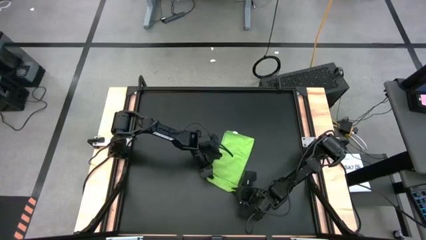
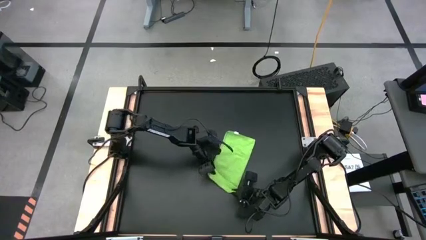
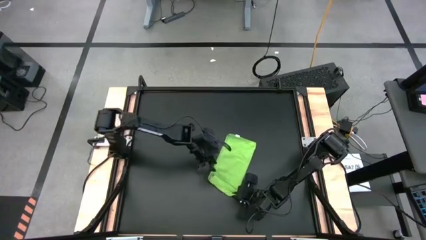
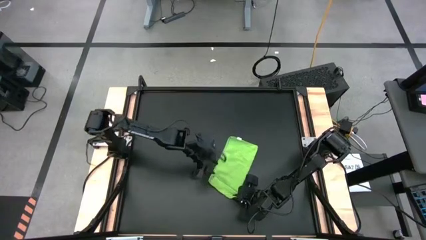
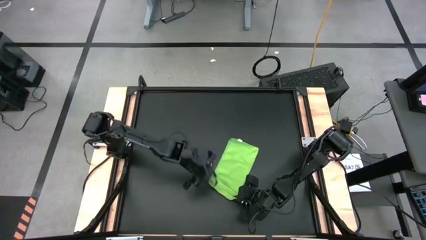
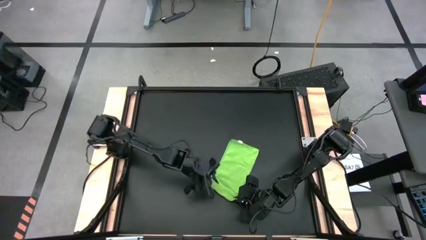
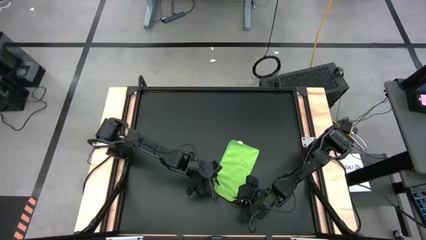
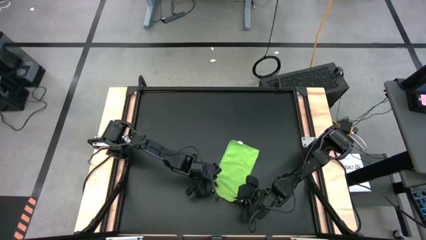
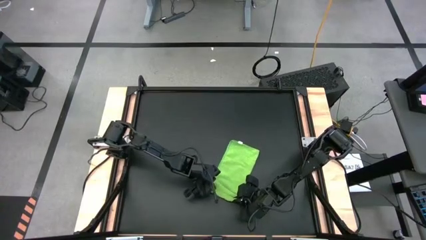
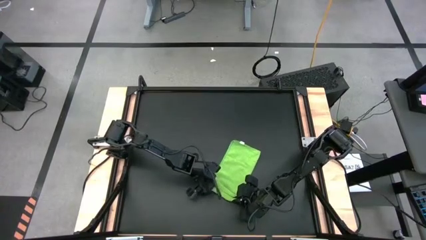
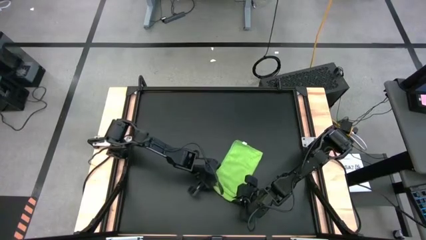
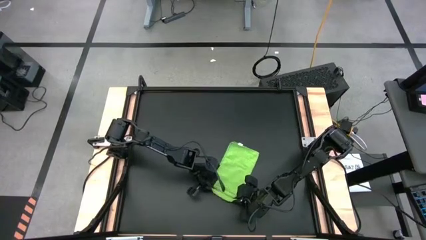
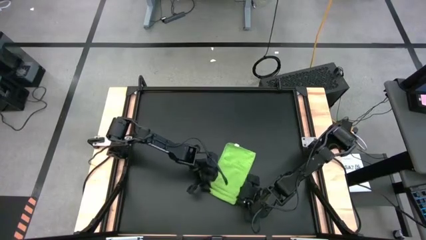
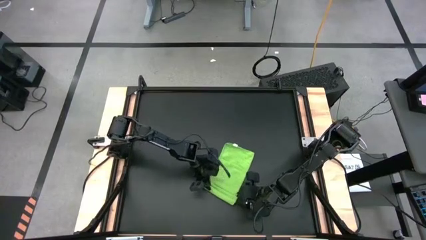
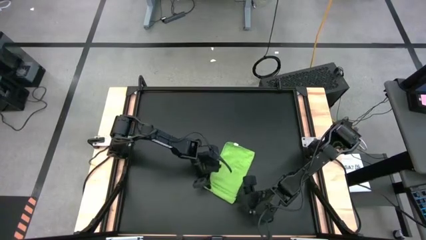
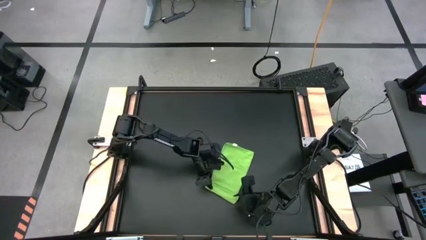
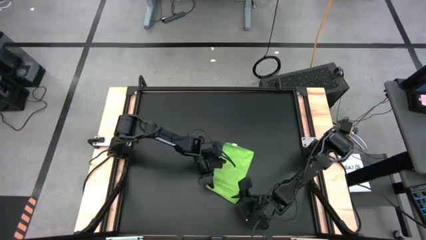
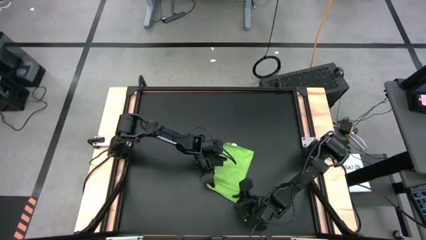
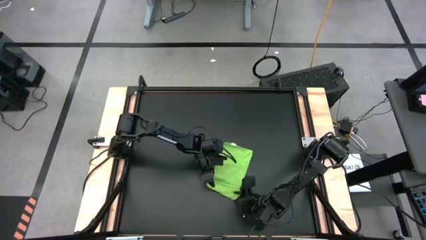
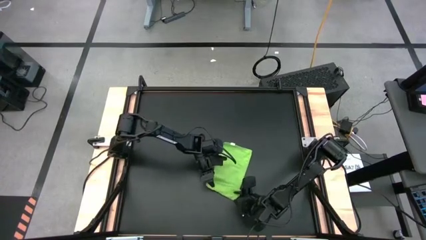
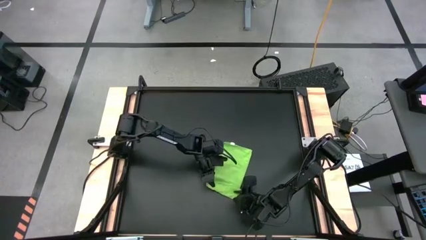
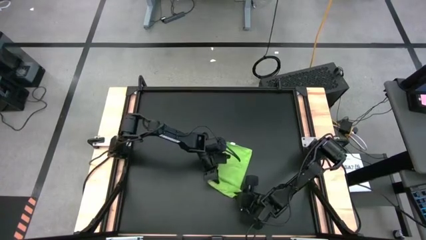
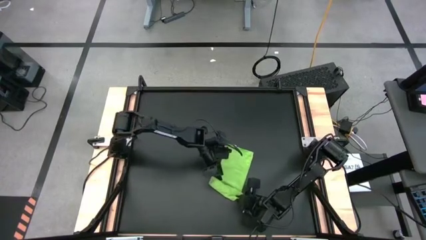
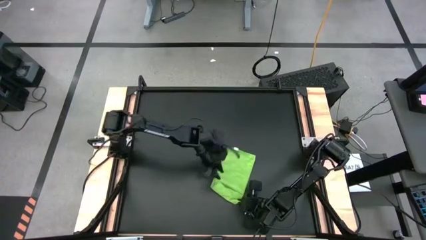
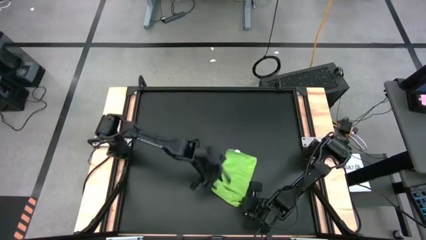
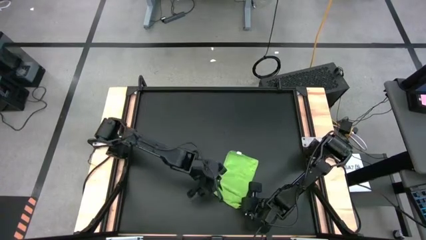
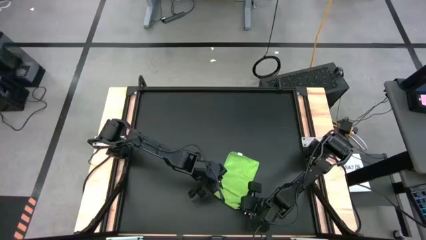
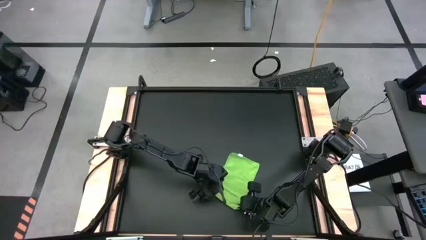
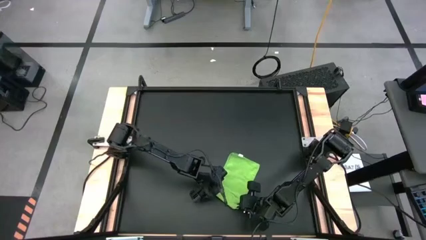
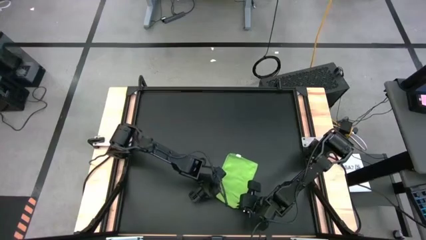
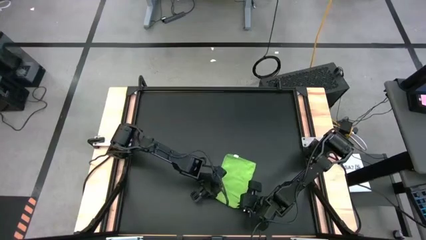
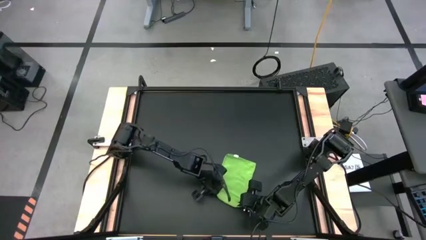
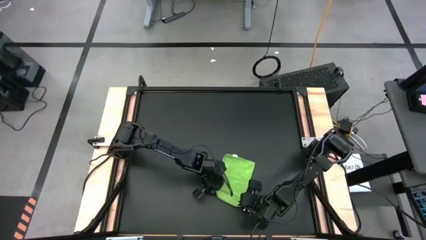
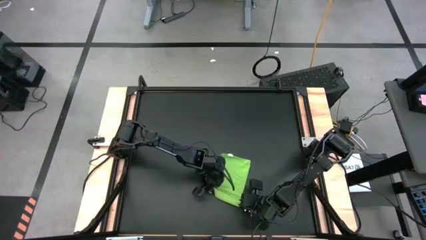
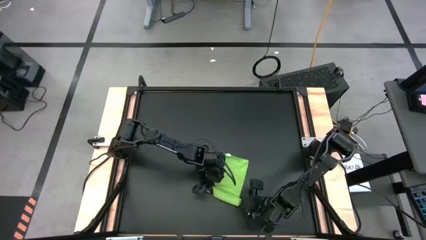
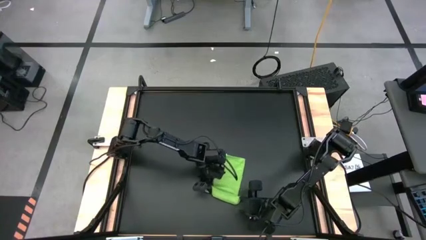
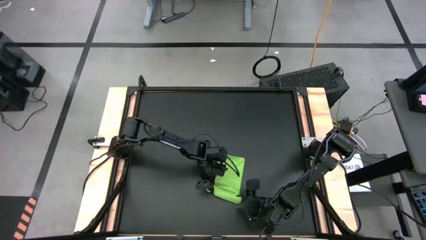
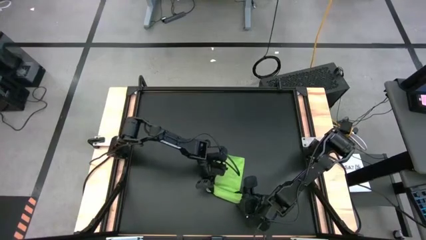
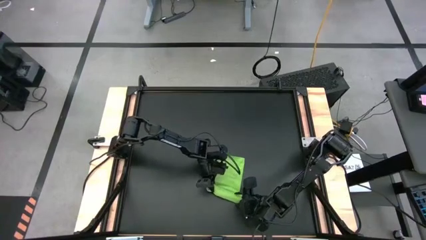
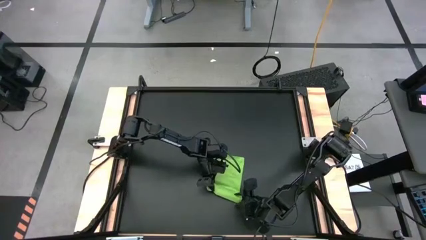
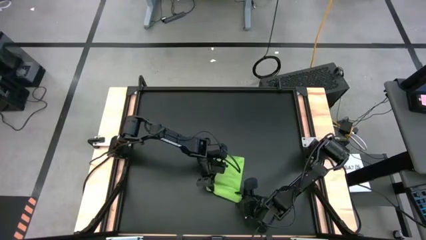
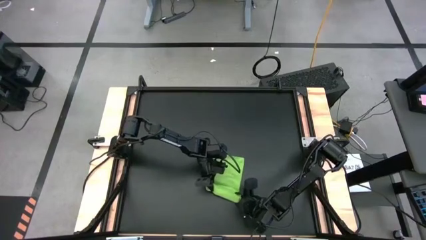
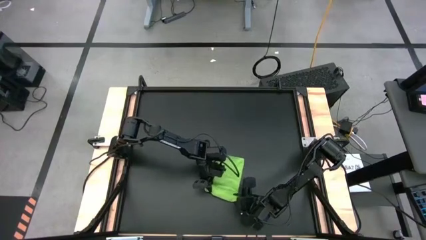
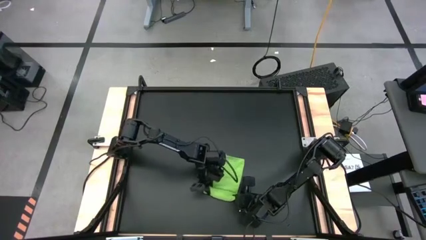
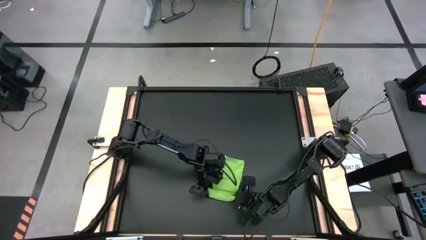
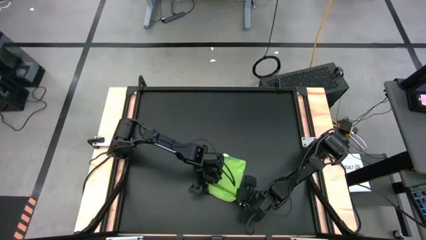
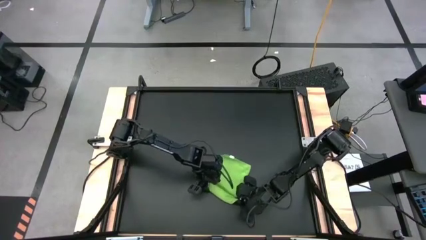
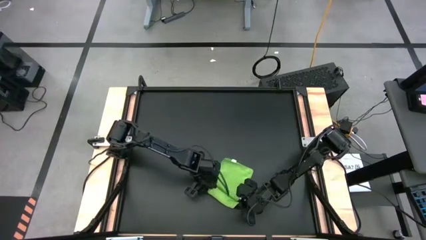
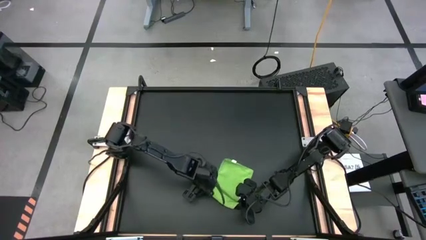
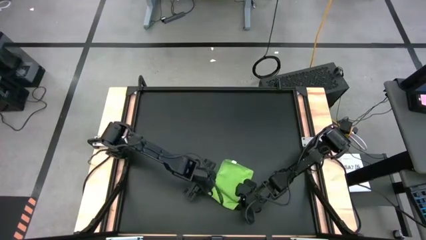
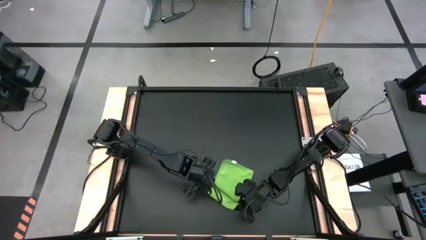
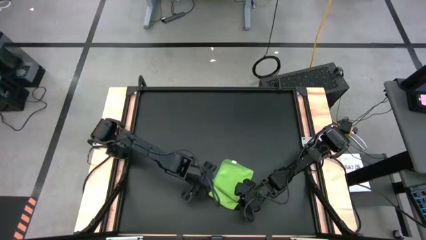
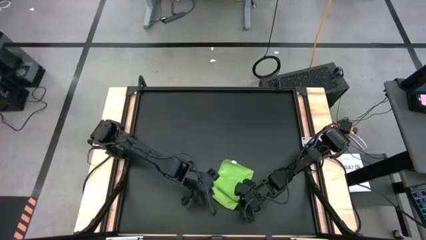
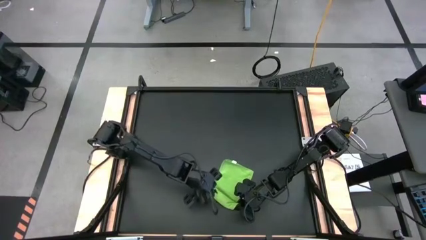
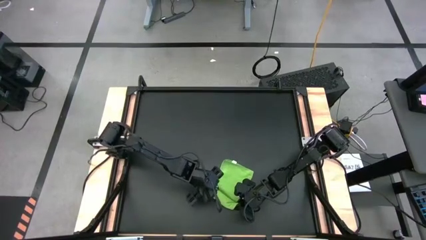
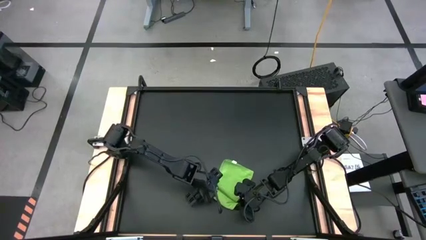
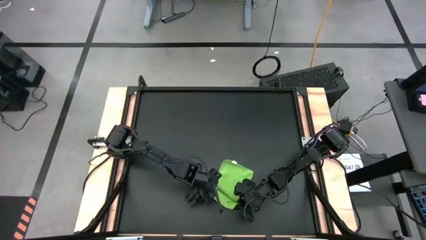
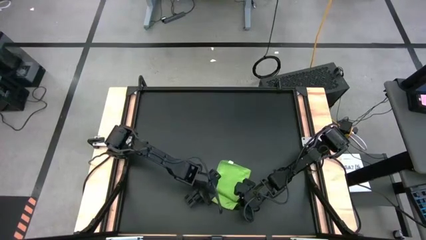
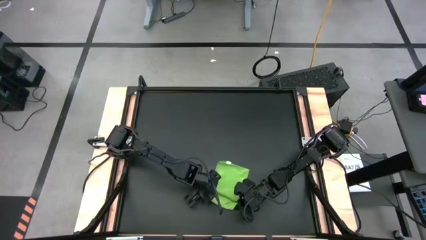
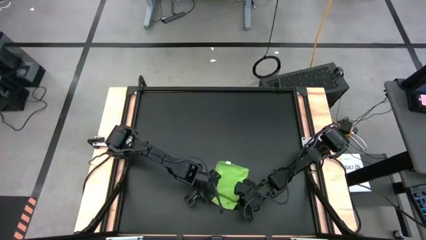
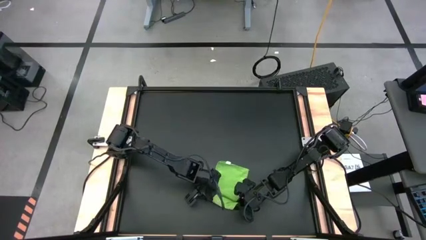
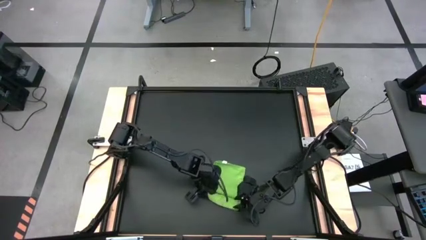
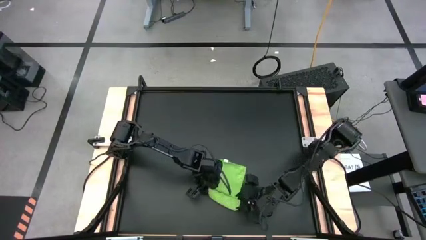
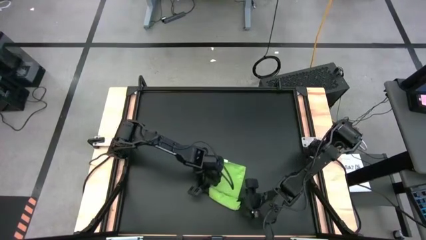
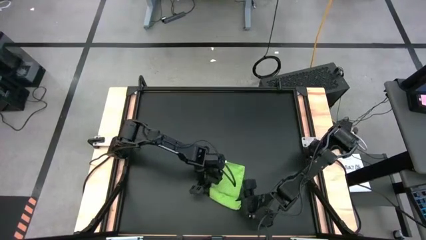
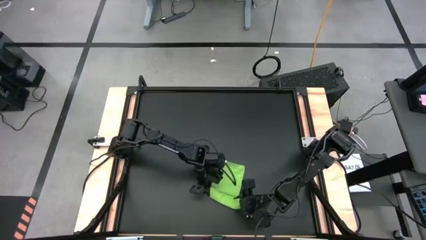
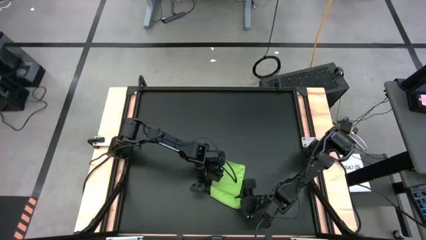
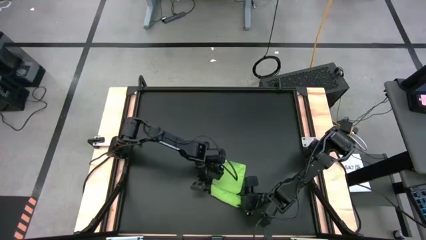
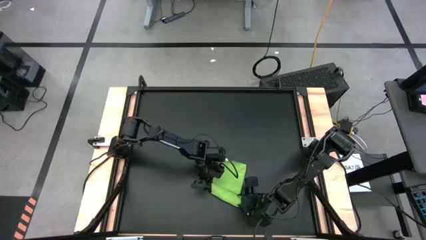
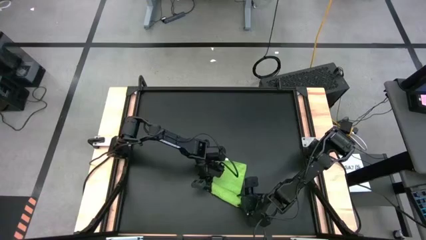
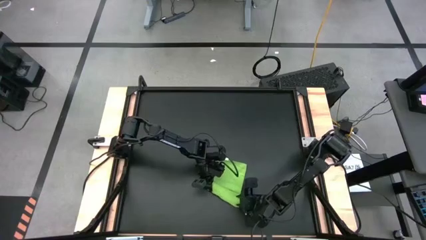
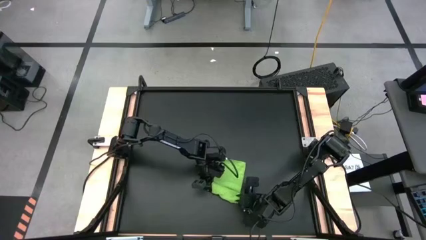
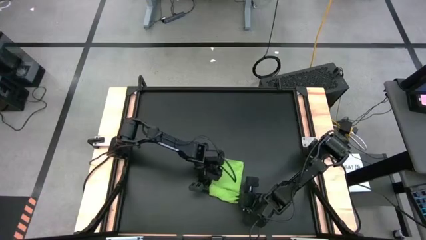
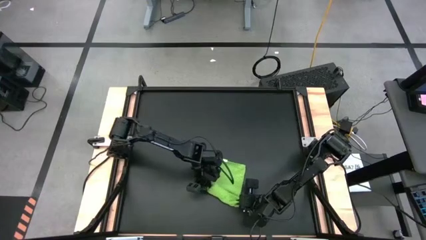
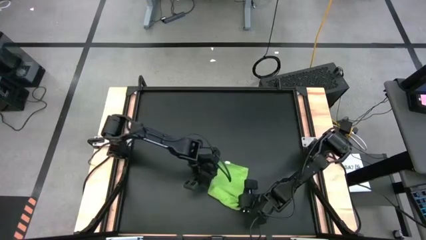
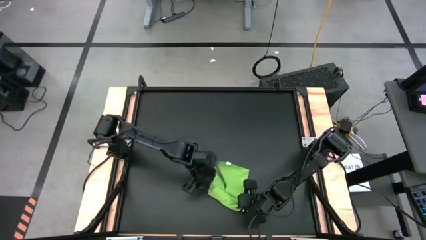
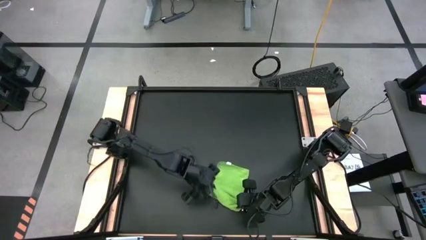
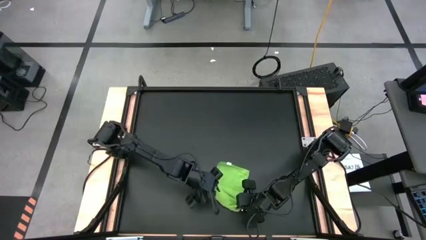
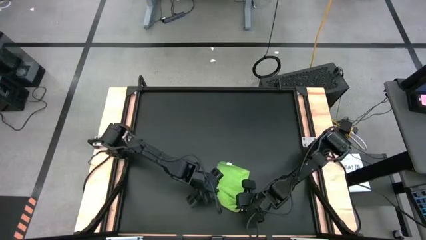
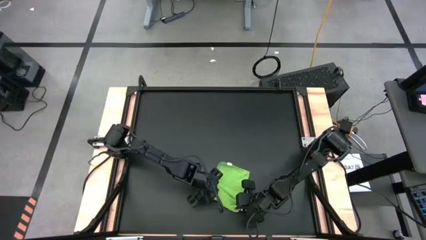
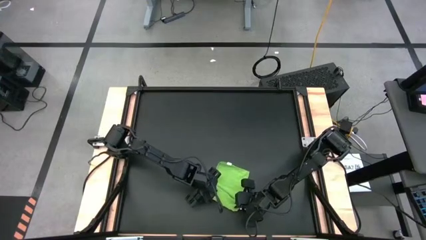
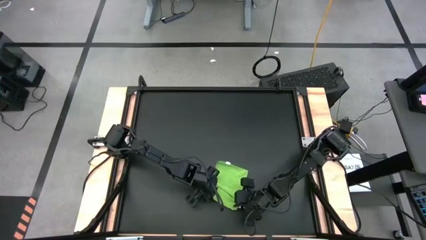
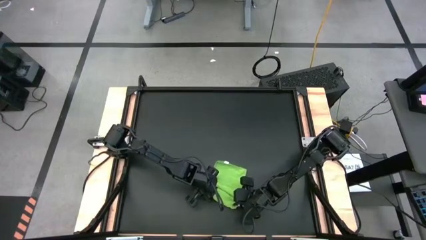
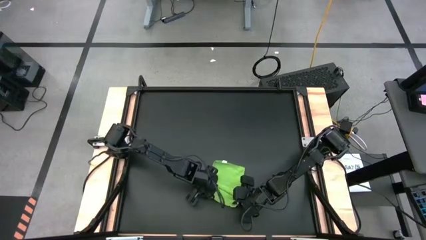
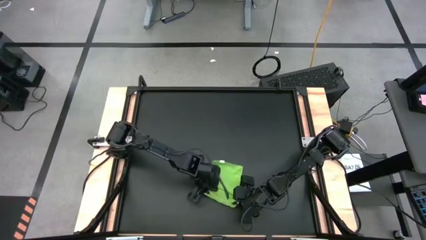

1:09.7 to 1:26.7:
Task: Roll towel into tight, uniform cylinder
Roll the green towel
